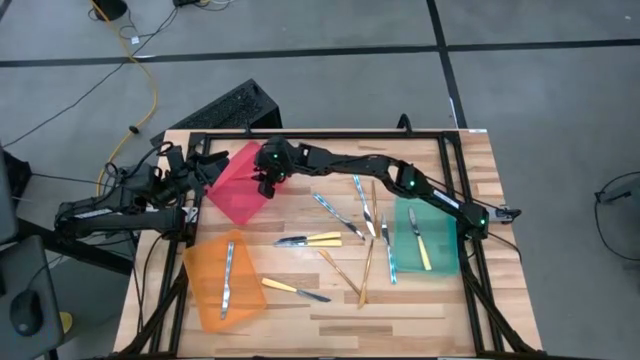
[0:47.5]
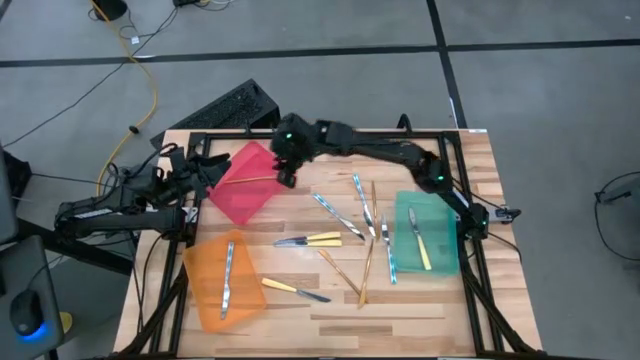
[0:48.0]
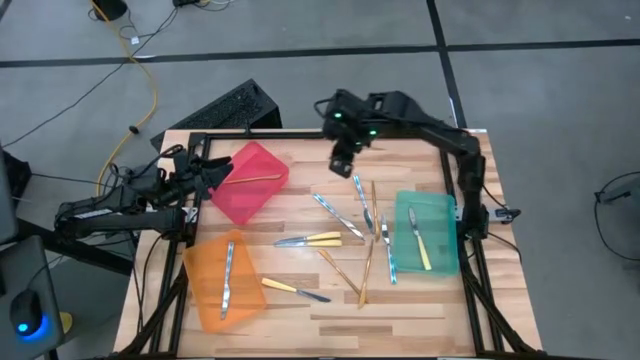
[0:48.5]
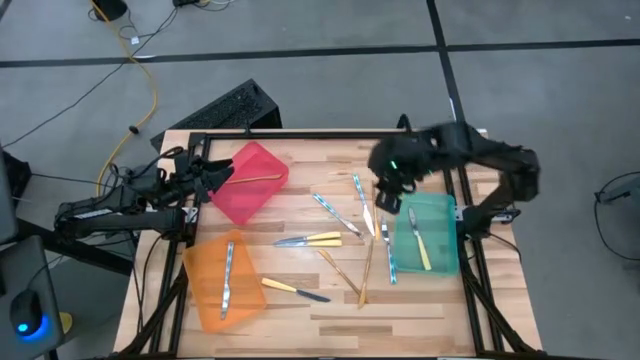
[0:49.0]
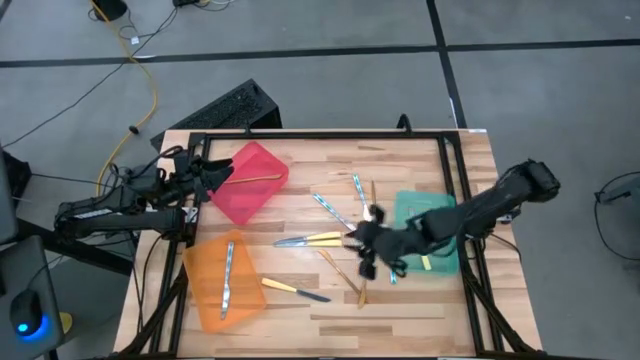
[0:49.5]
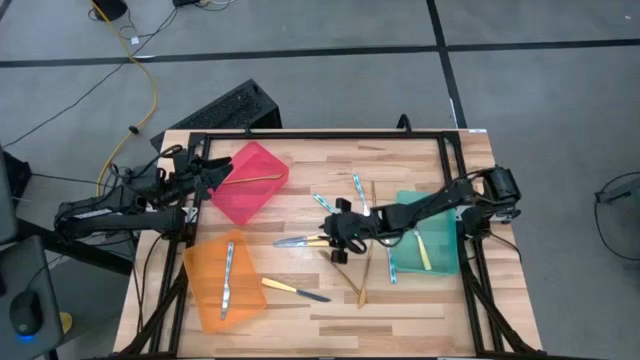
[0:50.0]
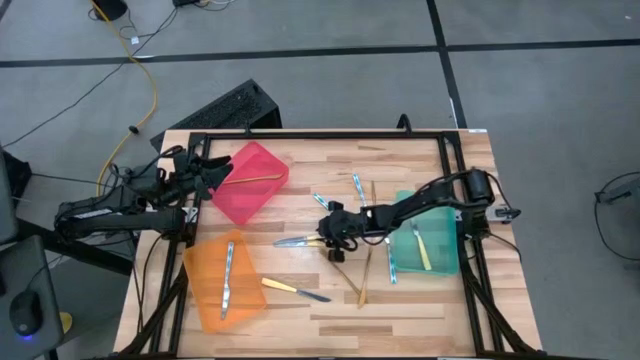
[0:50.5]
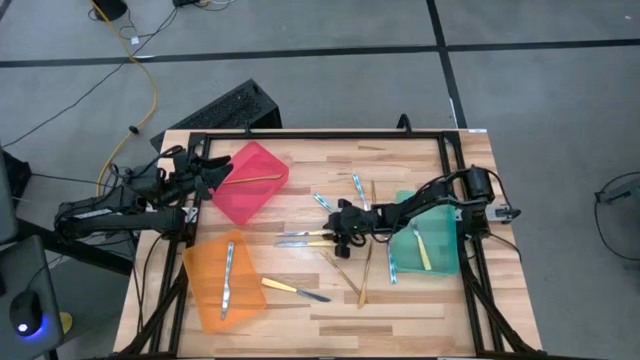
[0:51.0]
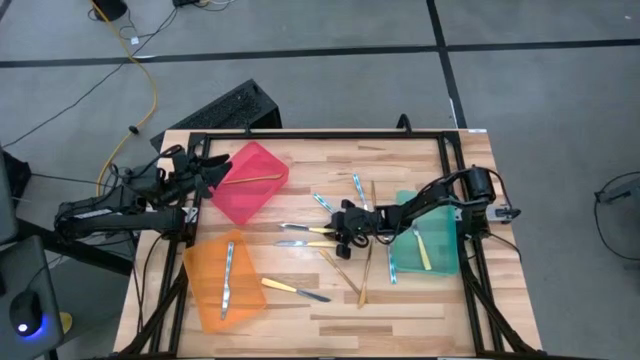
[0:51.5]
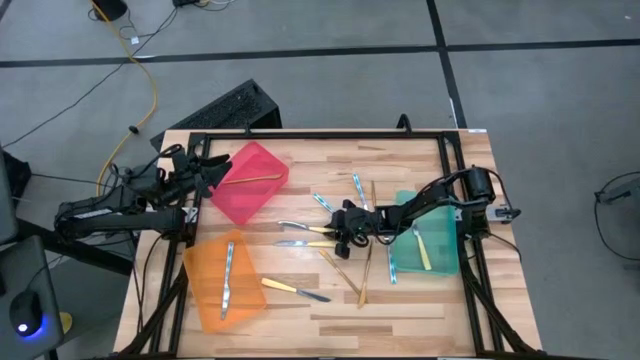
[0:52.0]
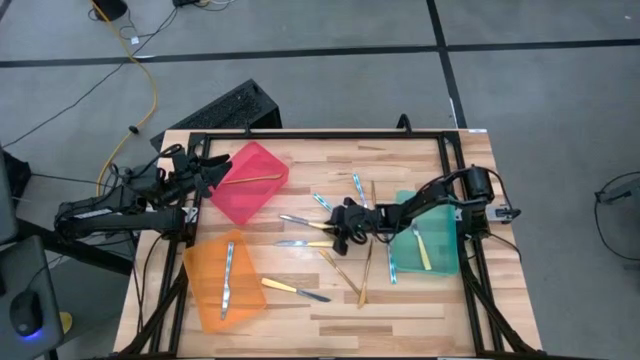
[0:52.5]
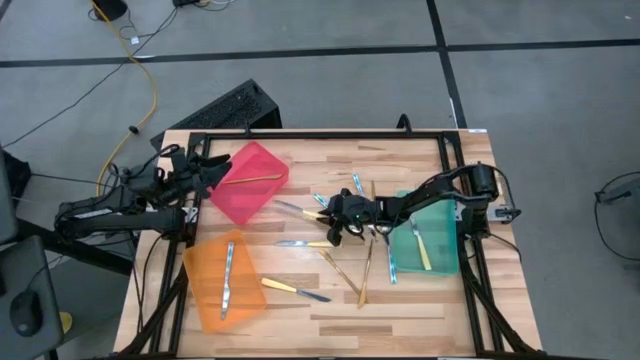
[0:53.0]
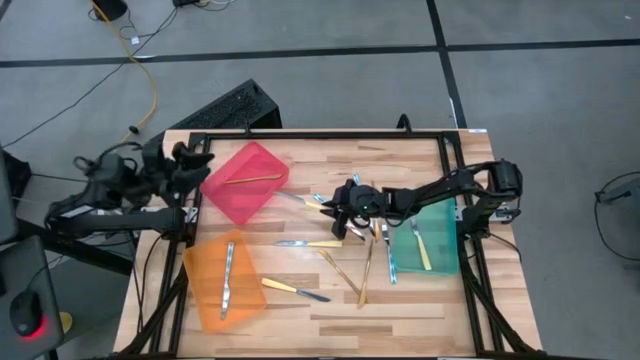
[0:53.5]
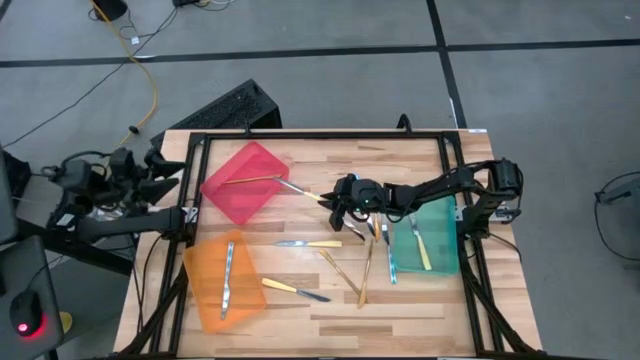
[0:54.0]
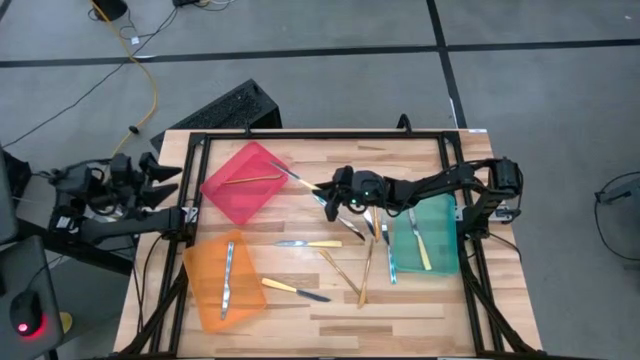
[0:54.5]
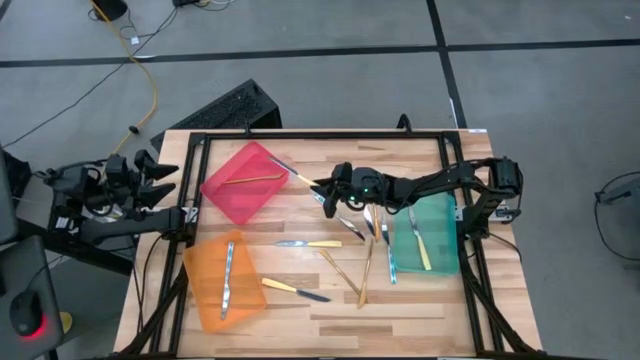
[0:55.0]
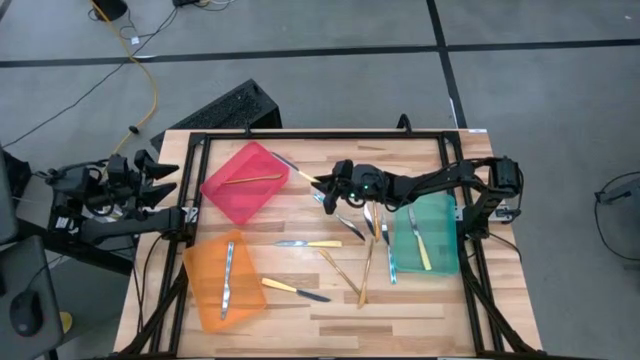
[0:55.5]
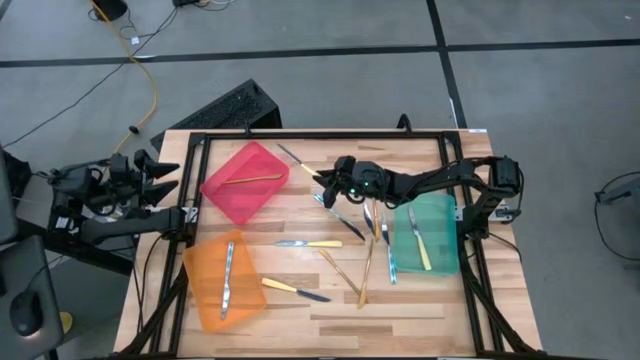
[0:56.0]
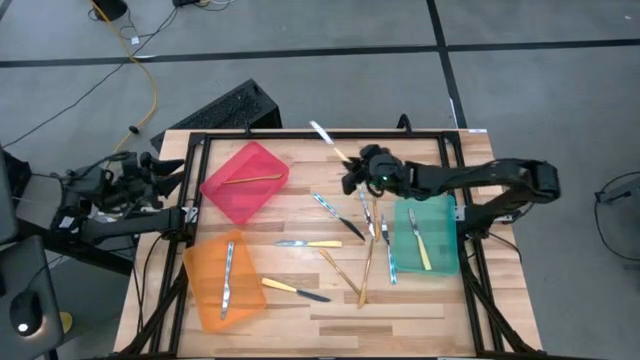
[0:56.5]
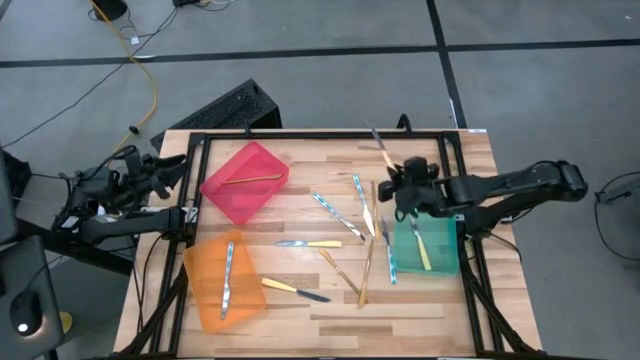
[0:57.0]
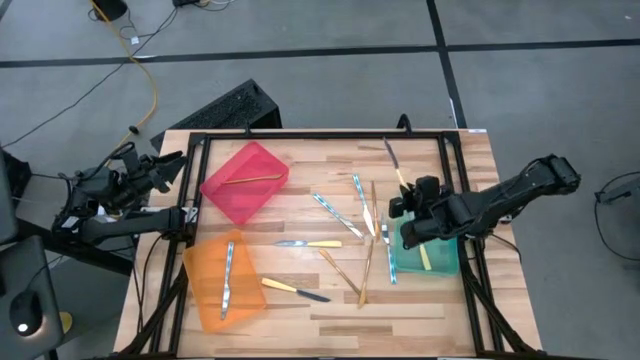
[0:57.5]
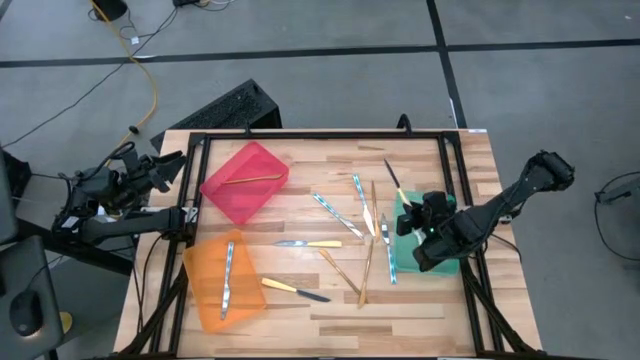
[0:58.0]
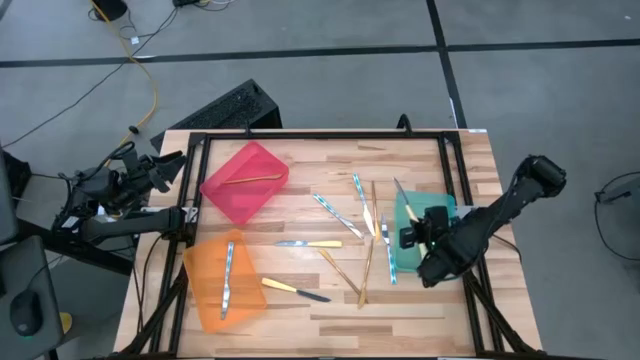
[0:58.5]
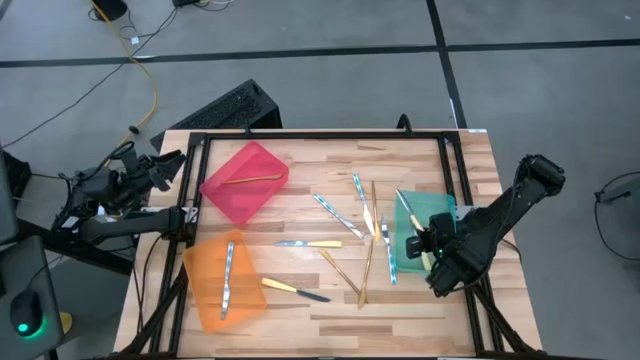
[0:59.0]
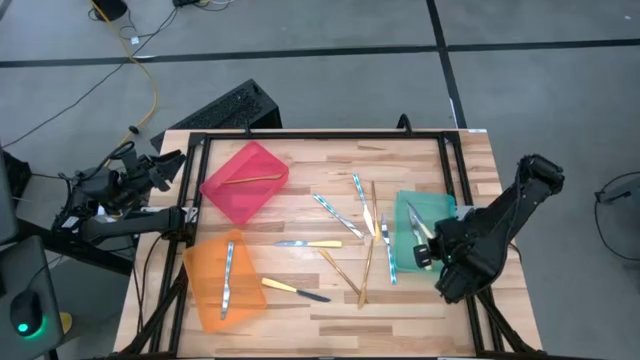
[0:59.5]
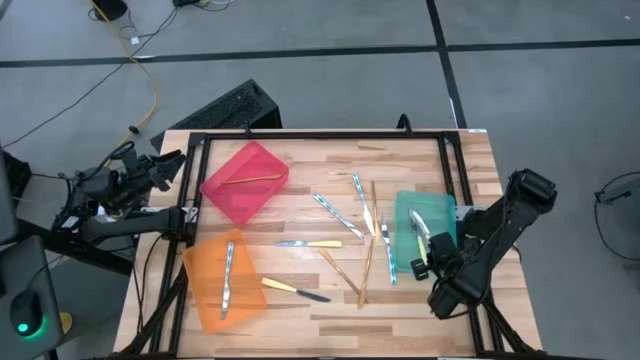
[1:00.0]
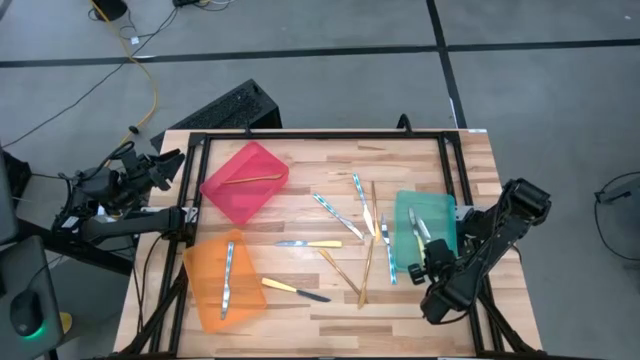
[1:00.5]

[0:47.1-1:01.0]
Task: Sort silverware by color (type)
Put the yellow knife into the green bin

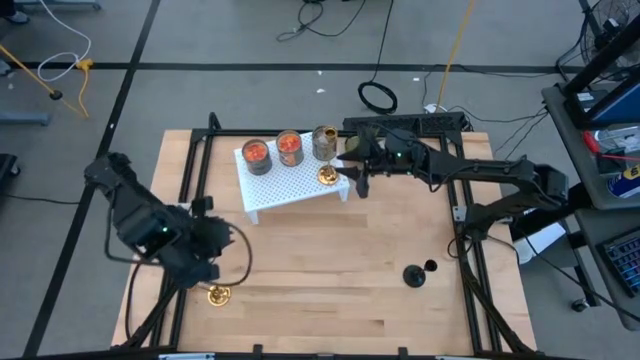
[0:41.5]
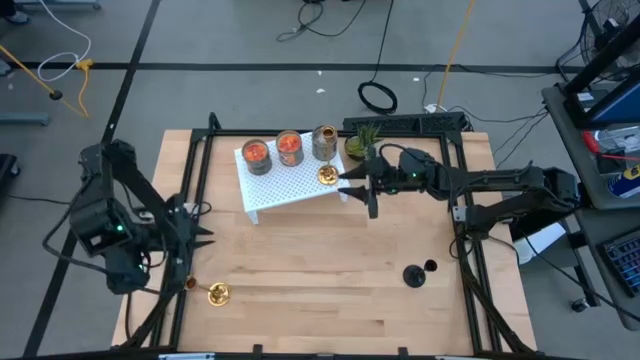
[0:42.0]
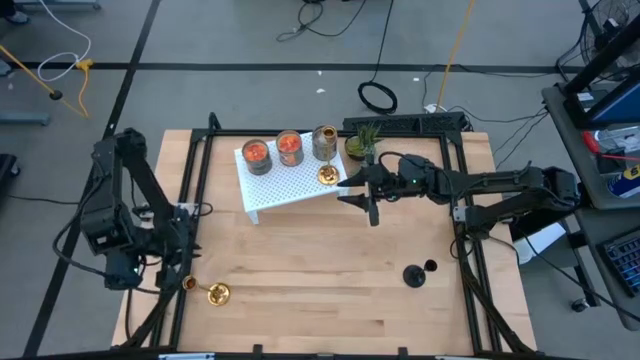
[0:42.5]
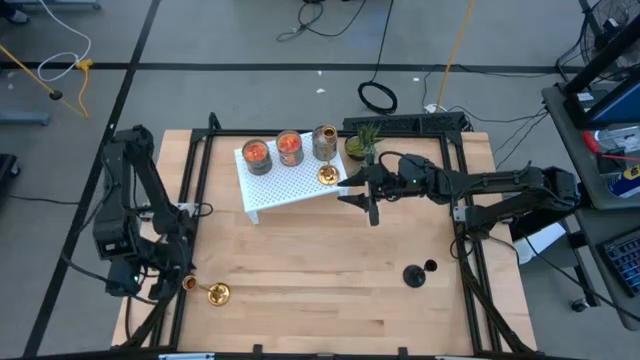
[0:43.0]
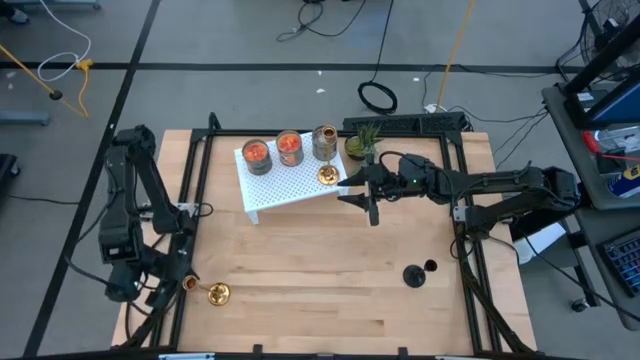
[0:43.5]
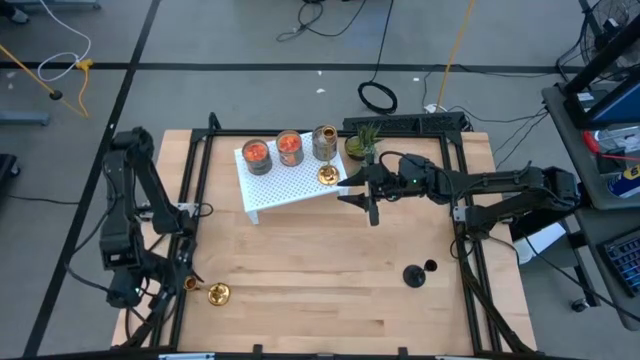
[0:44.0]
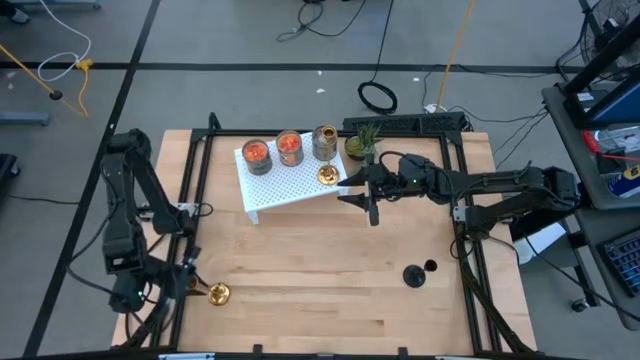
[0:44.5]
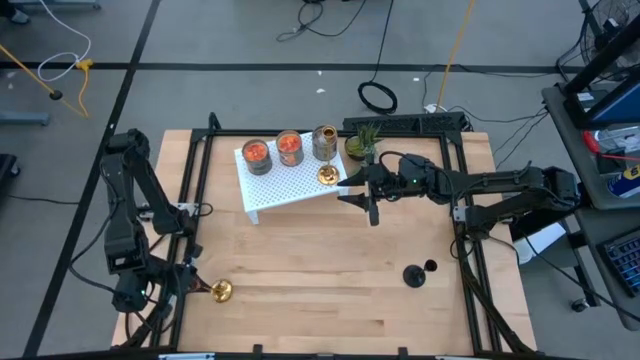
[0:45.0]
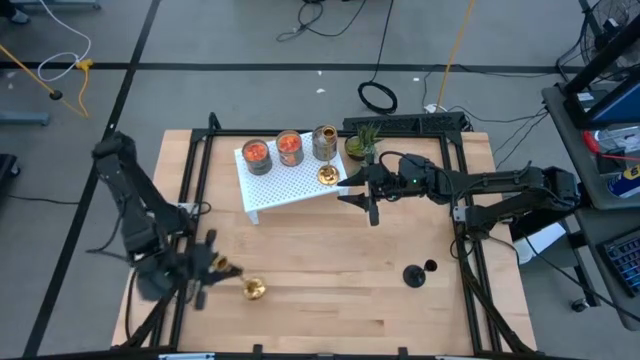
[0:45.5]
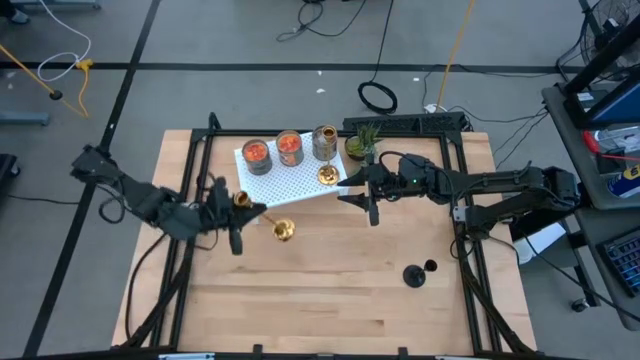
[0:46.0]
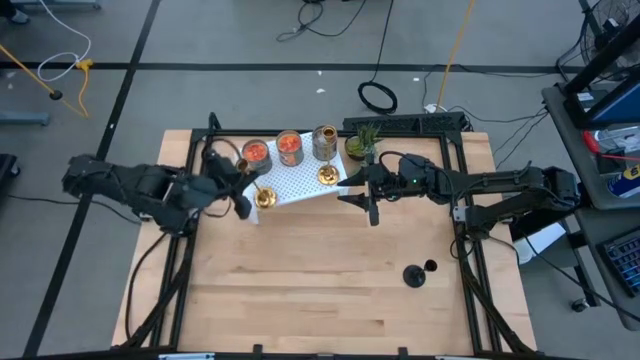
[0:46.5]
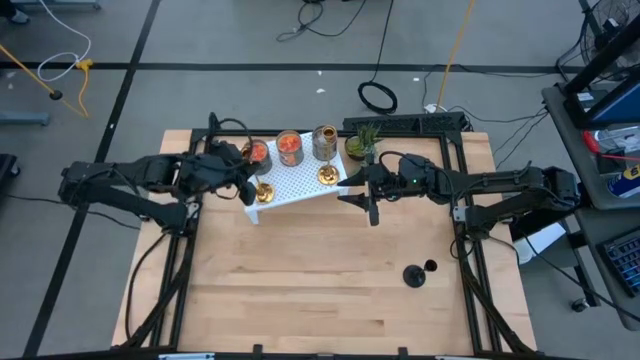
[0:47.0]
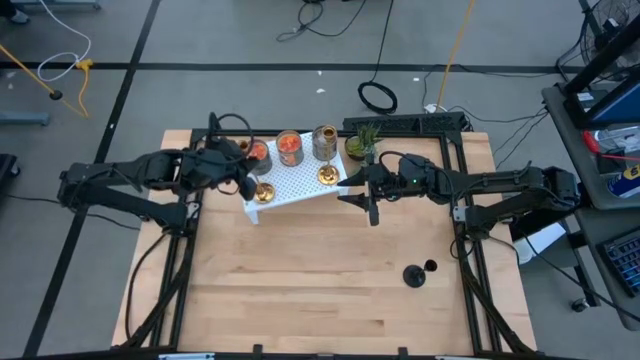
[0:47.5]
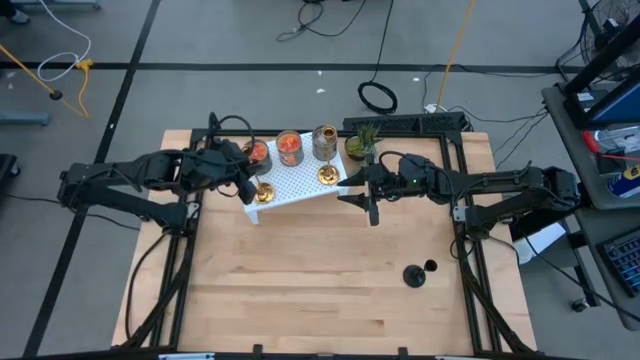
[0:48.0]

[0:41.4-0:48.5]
Task: Pick & Place candle stick holders
Put the gold candle holder on the shelf

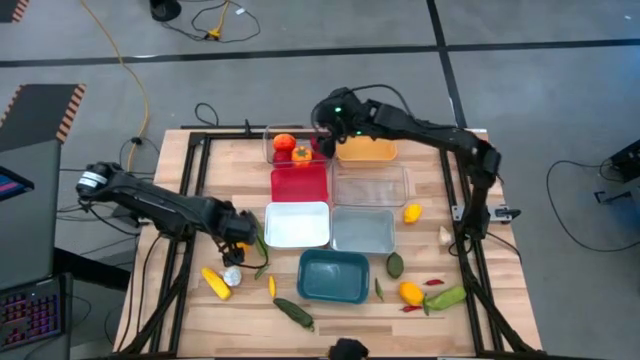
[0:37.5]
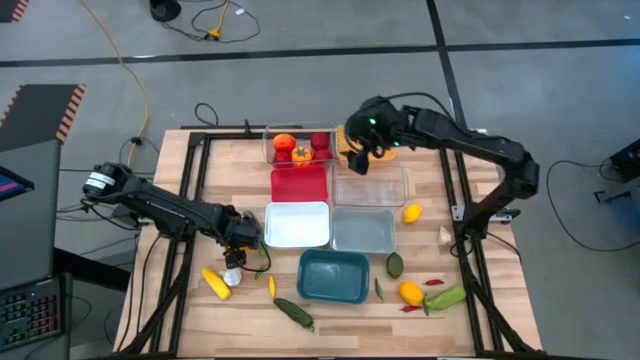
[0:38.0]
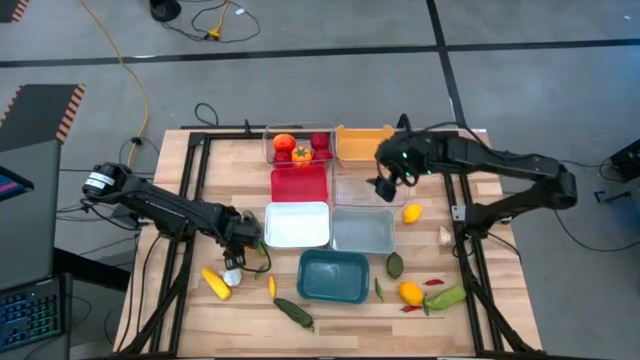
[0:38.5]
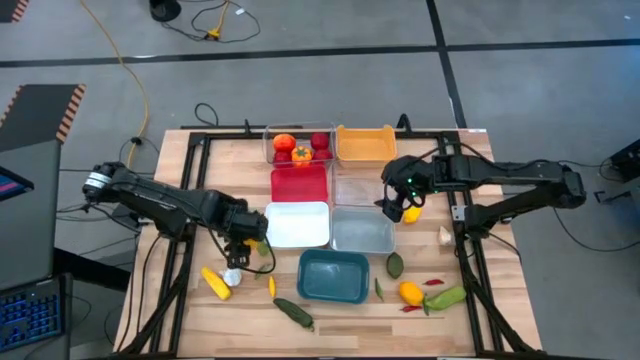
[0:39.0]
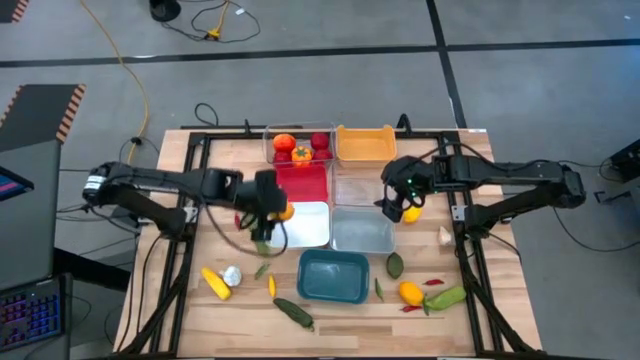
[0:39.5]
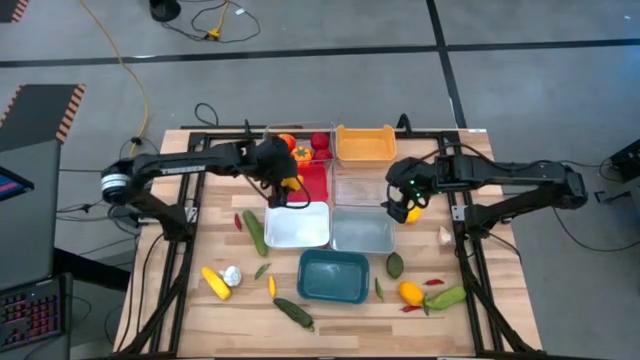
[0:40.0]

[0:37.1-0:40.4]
Task: Sort produce into baskets
Put the middle left yellow lemon into the red bin
